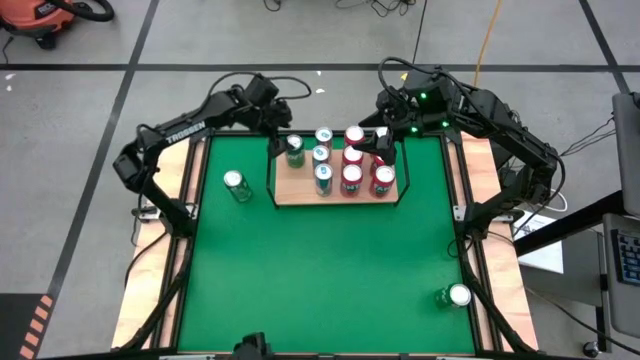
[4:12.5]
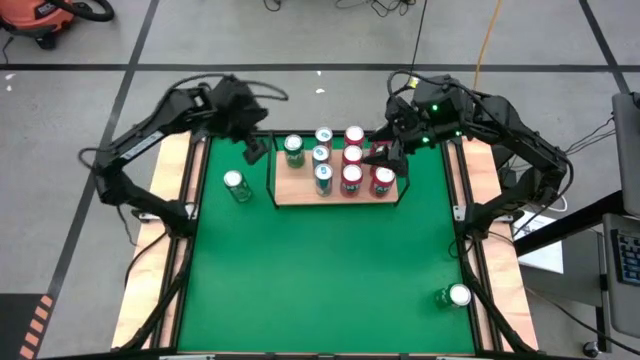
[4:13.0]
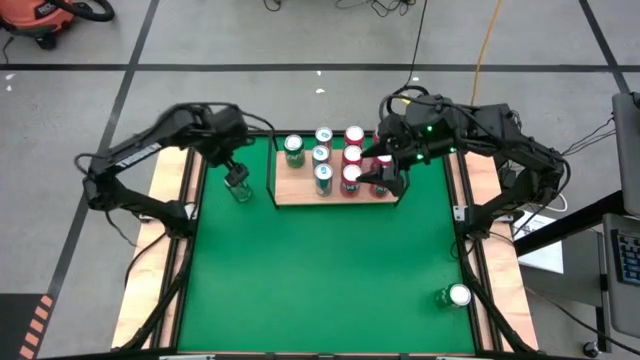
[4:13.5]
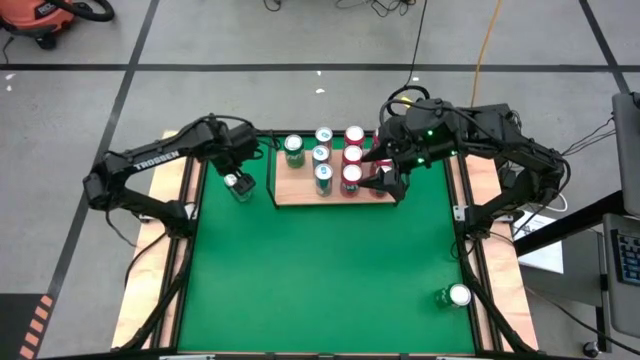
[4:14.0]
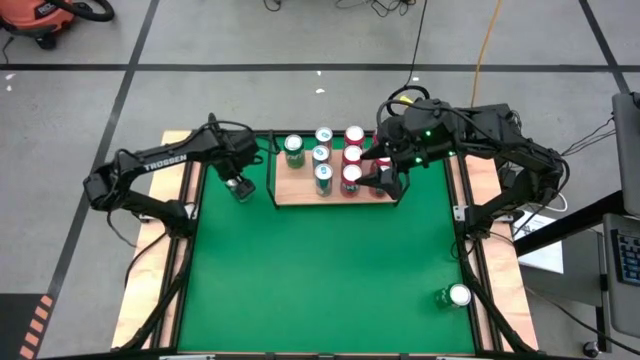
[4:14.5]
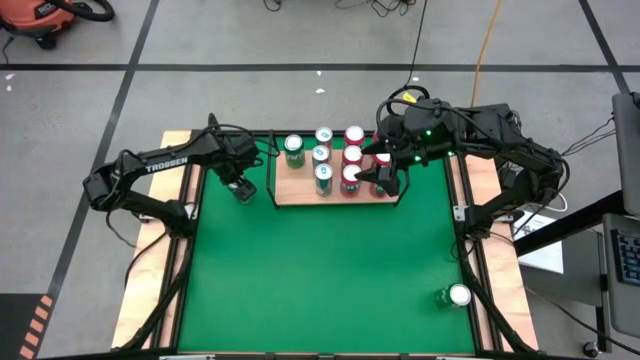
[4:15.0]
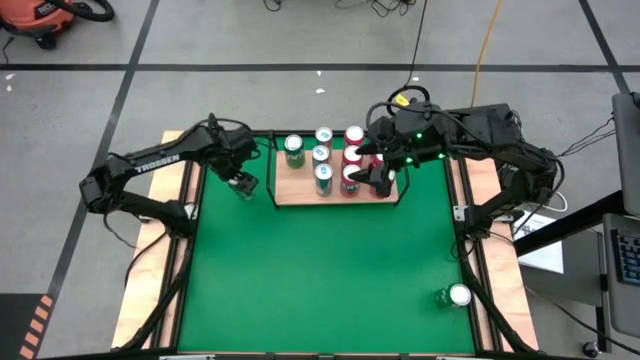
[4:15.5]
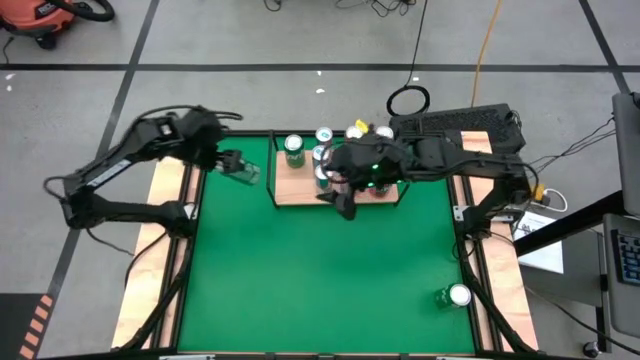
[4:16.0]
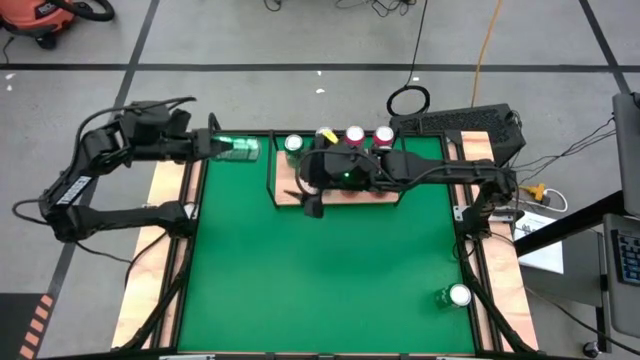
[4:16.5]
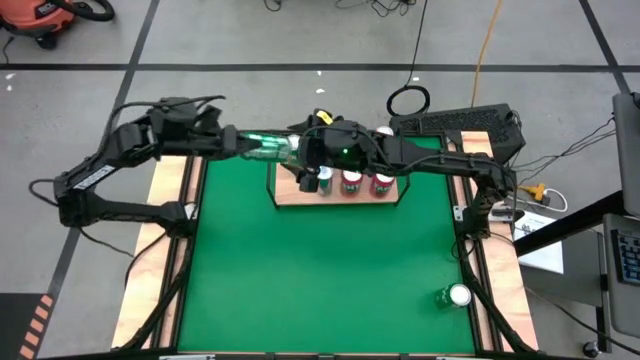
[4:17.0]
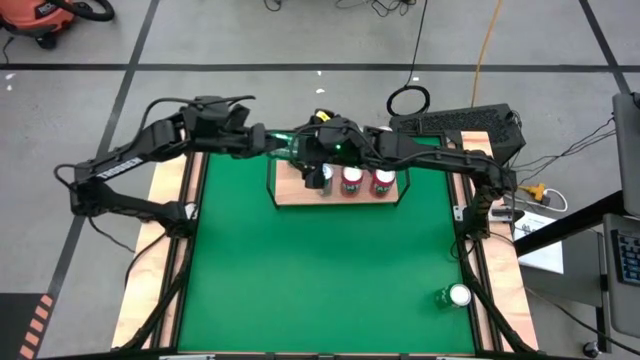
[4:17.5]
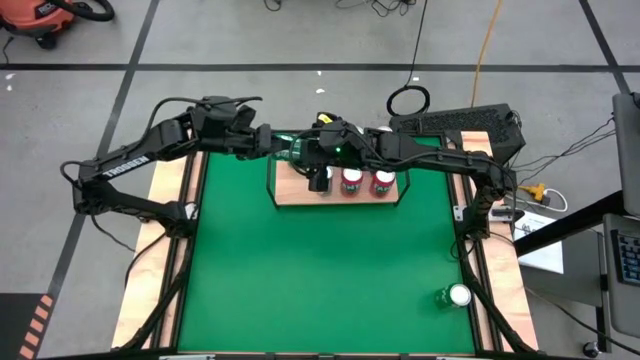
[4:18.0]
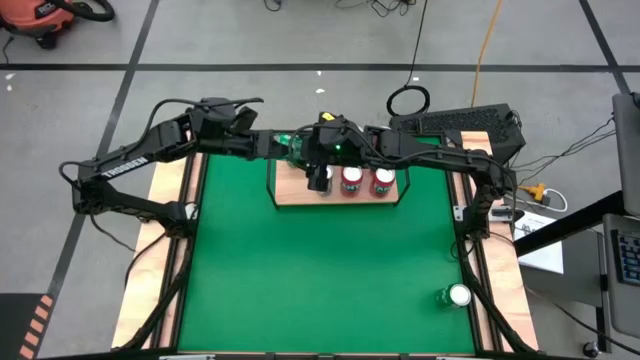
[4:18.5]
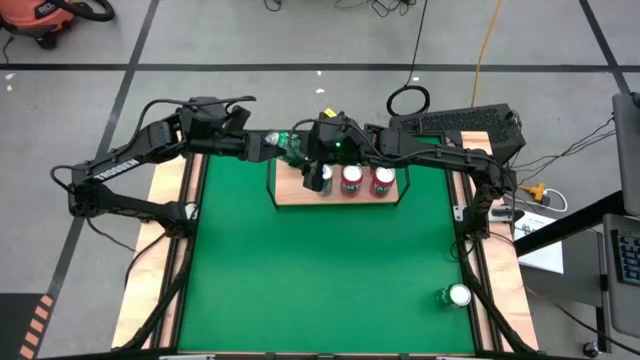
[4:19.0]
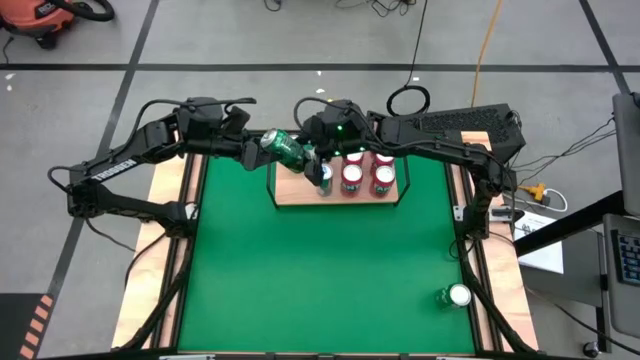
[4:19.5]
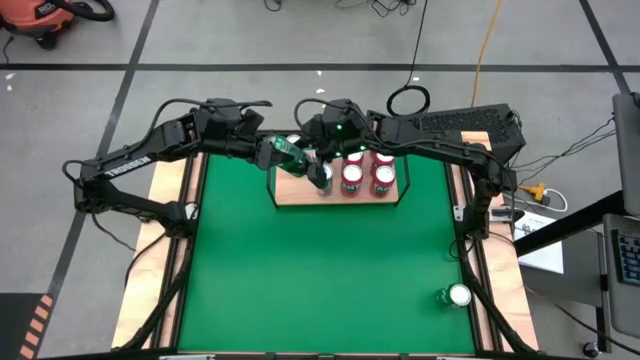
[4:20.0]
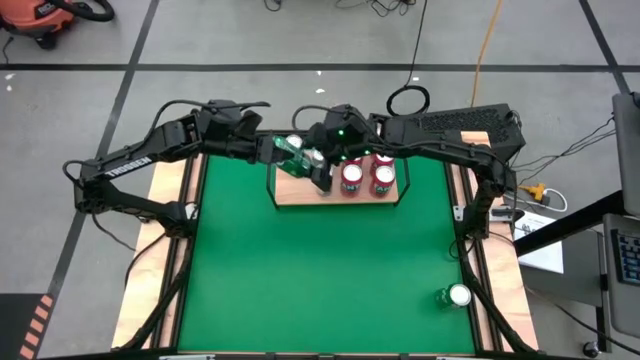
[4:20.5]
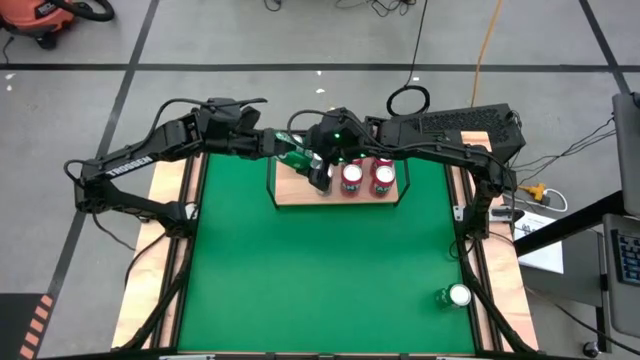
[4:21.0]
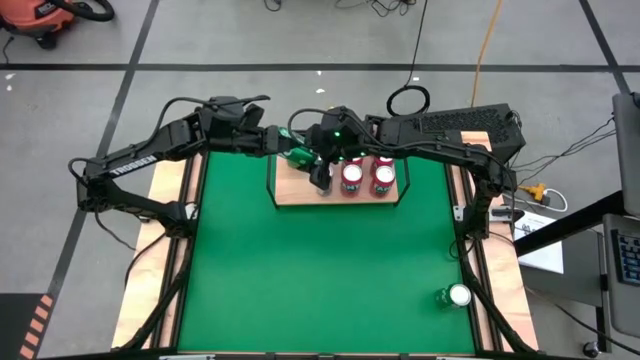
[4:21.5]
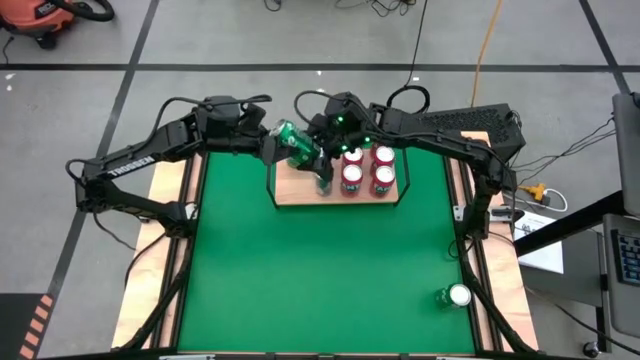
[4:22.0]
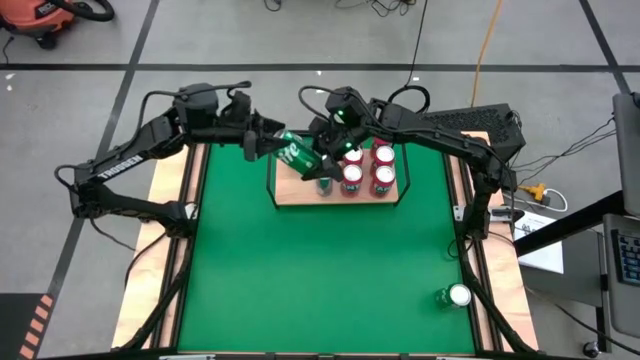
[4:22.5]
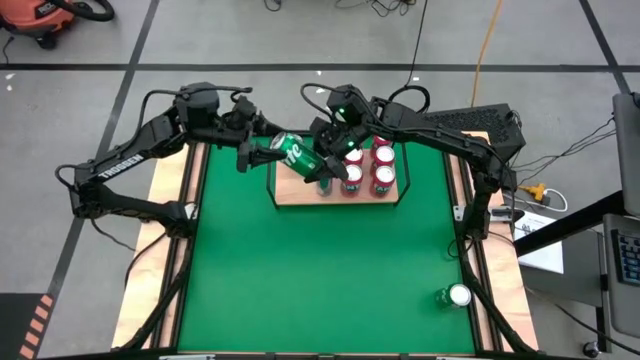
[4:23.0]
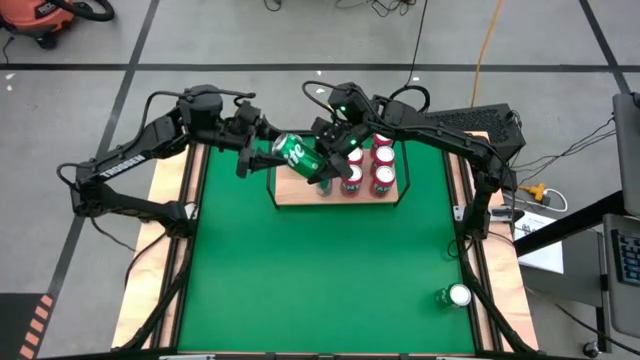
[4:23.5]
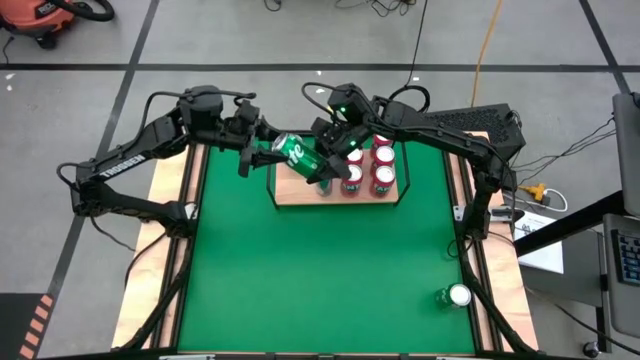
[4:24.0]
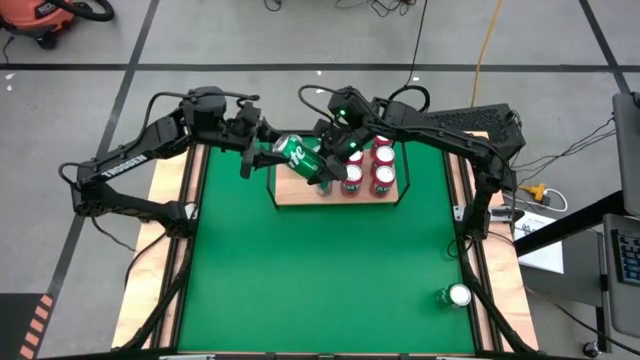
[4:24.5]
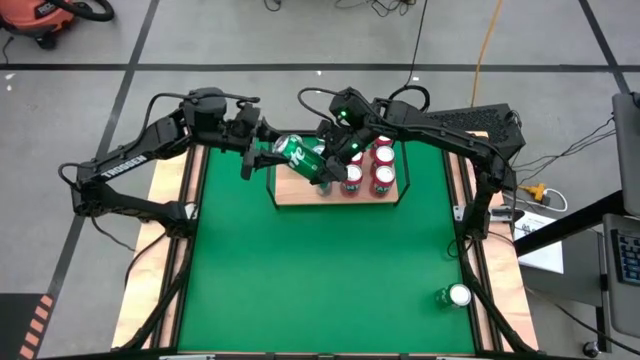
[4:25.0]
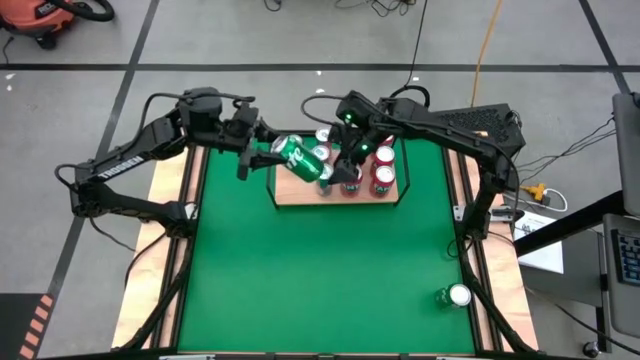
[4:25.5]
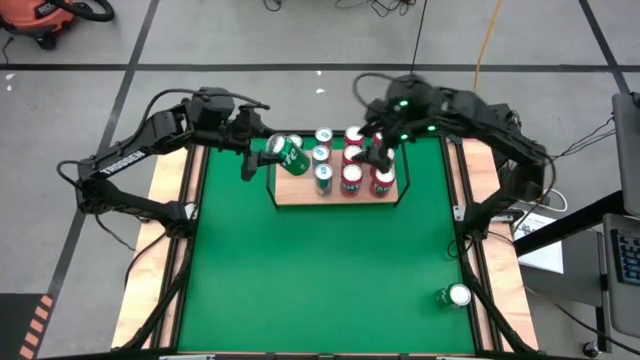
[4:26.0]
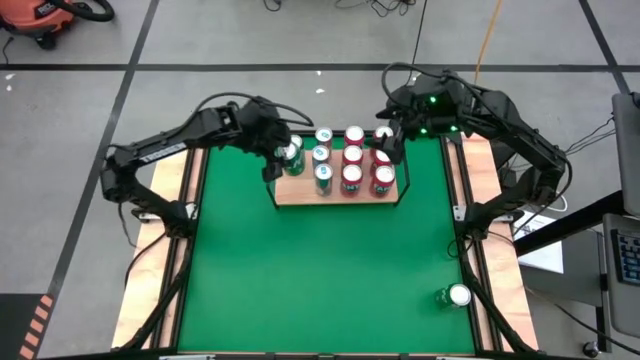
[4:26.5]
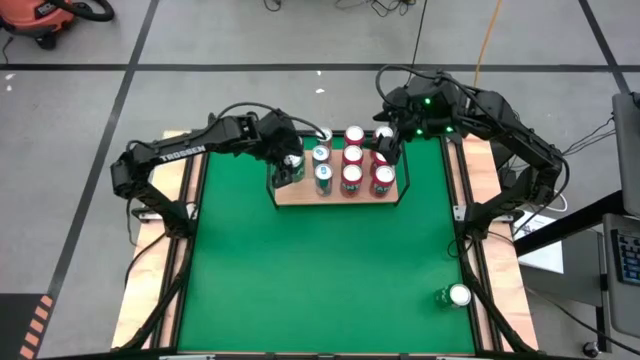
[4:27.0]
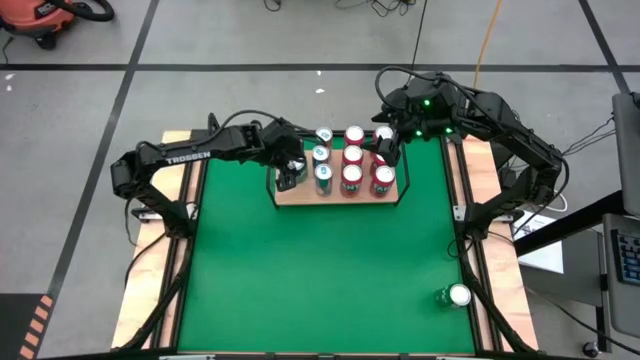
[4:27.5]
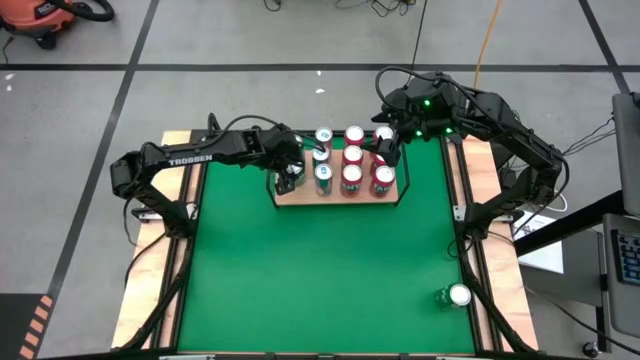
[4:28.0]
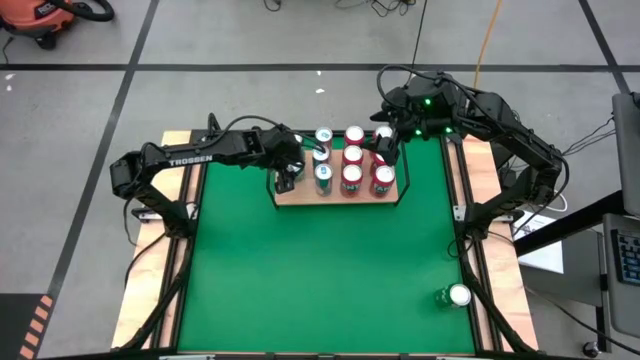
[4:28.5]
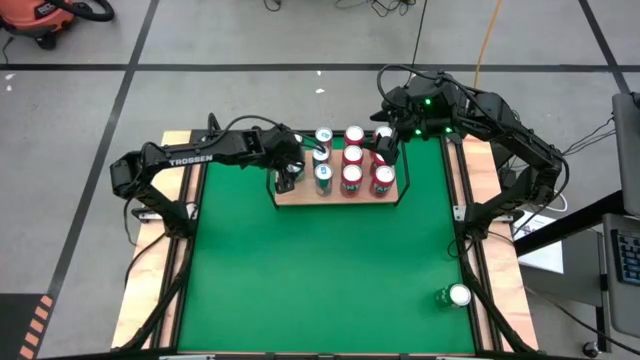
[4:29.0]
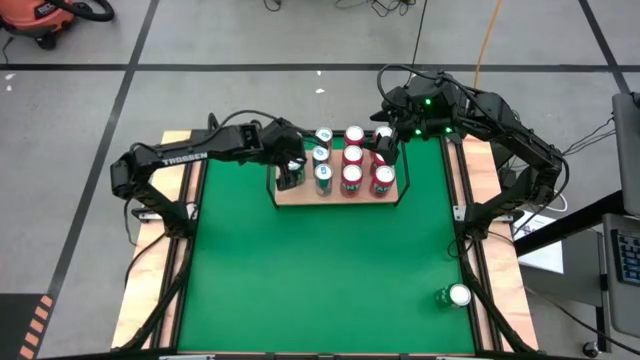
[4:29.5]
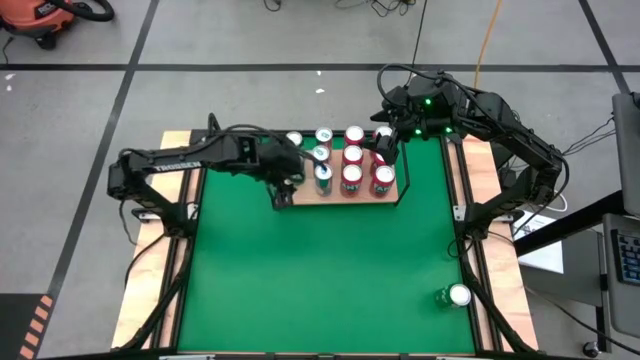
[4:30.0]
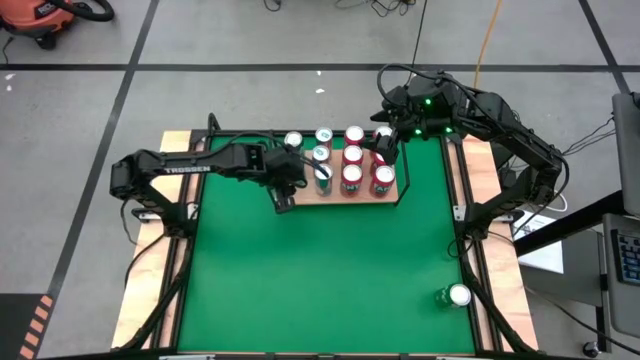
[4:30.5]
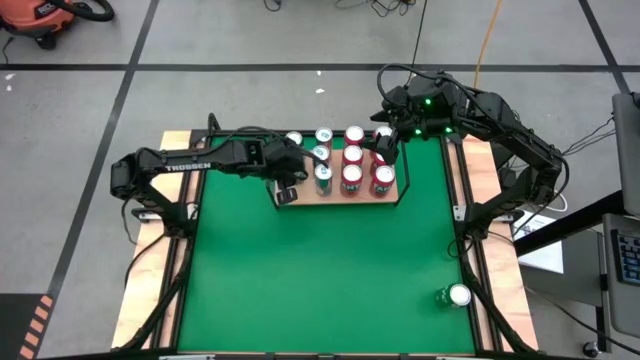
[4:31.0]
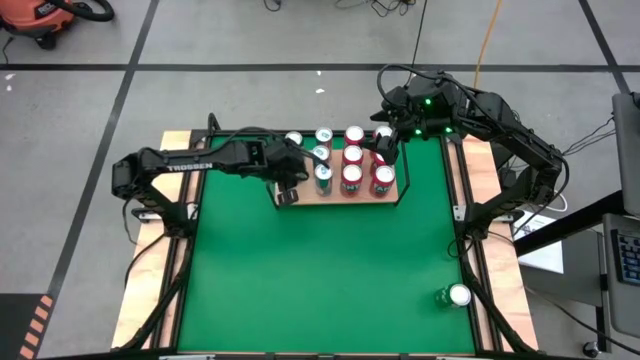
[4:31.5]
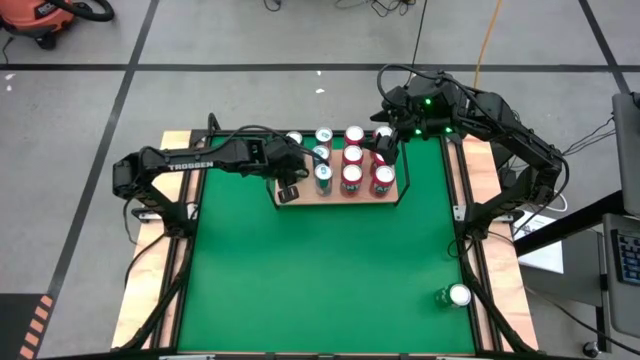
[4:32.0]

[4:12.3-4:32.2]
Task: Place canned beverage on shelf
Put the green soda can on the shelf aligned with the other green soda can on the shelf

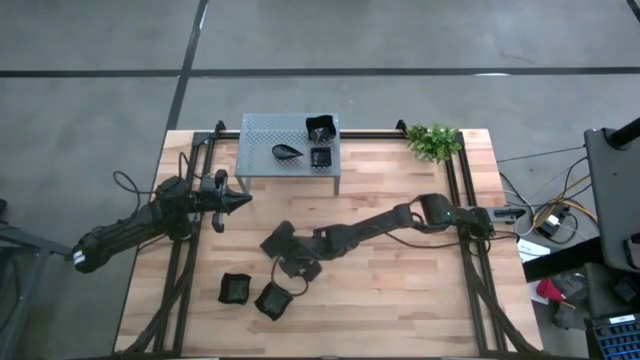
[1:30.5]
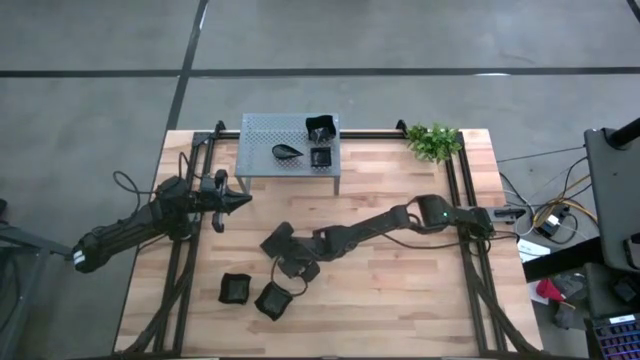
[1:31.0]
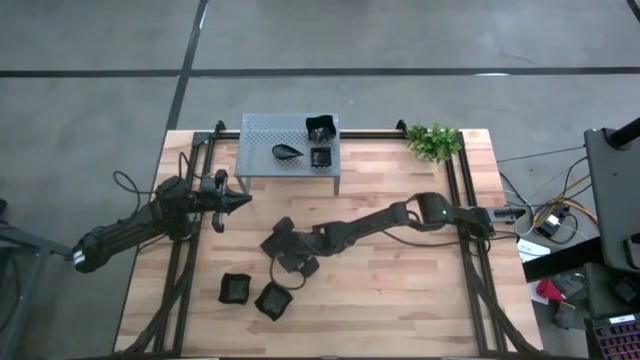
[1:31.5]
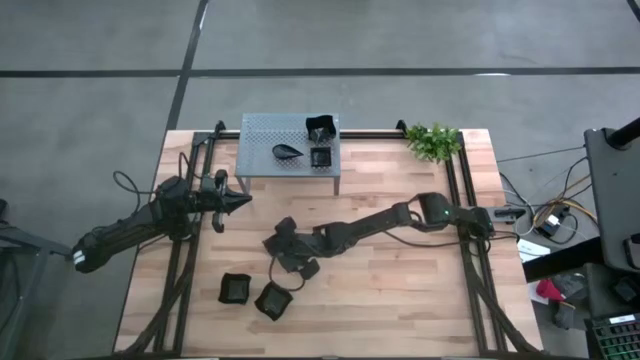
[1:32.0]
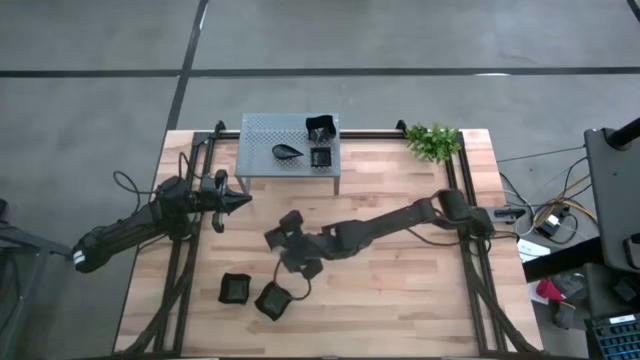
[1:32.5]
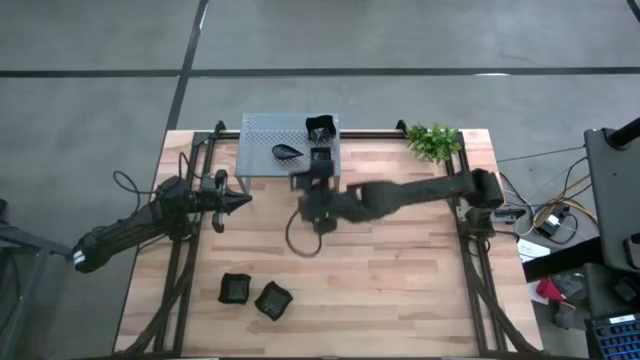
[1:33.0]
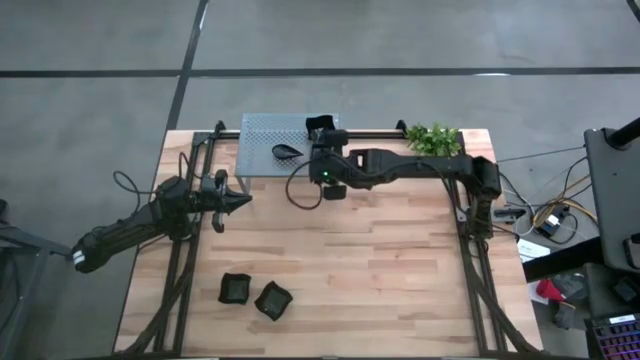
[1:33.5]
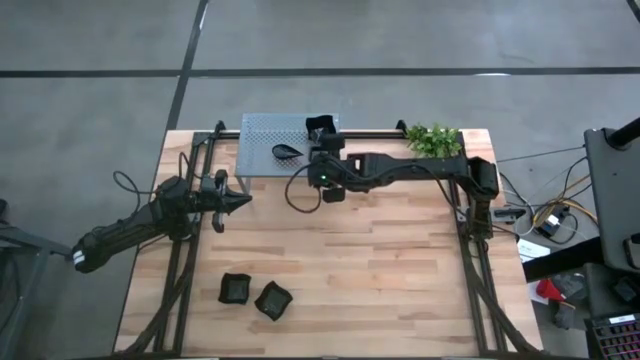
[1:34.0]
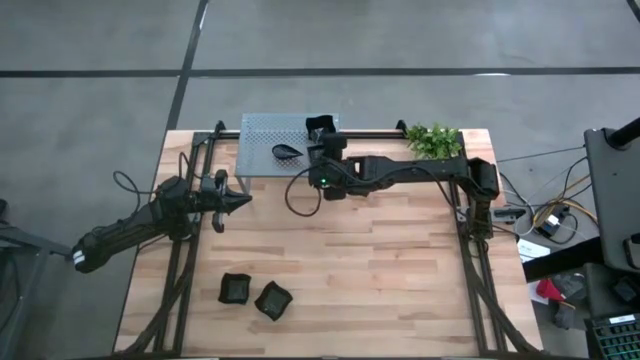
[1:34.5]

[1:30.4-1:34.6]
Task: Pick & Place Mini shaped plates
Stack the black square plate on top of the other black square plate on the shelf
